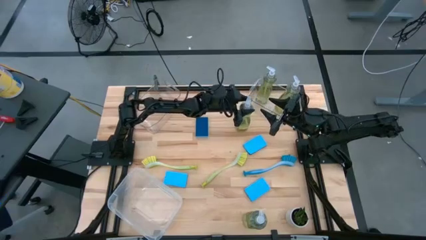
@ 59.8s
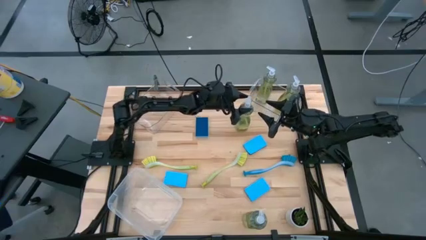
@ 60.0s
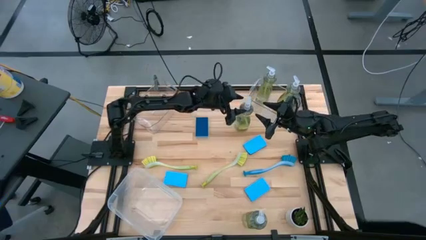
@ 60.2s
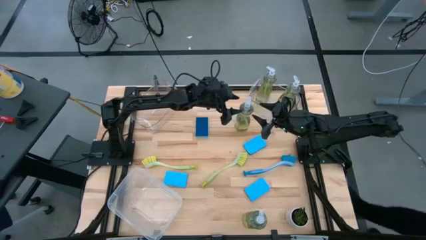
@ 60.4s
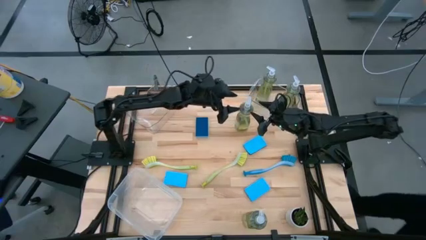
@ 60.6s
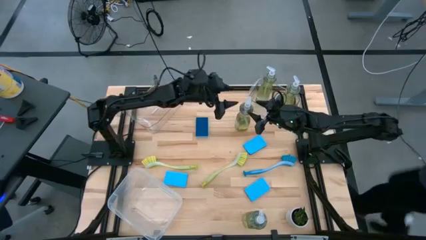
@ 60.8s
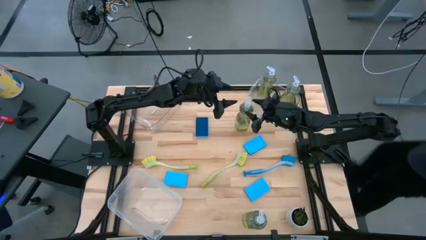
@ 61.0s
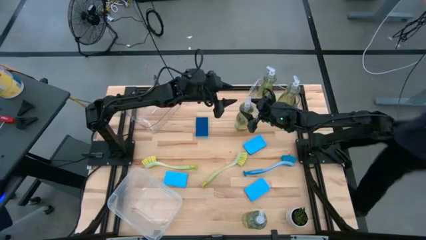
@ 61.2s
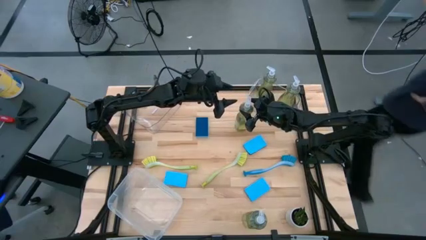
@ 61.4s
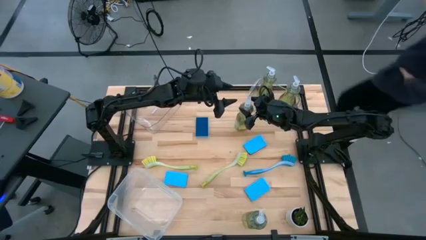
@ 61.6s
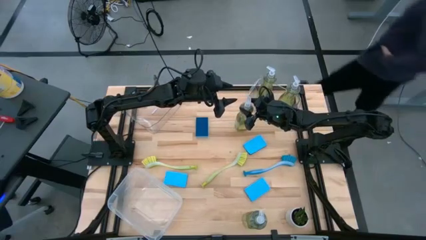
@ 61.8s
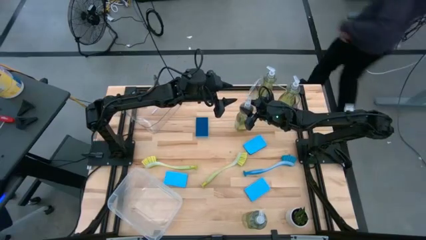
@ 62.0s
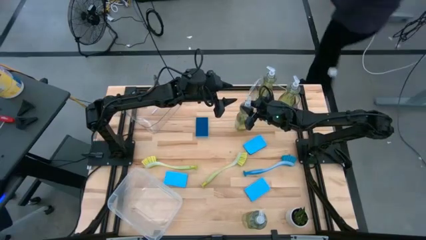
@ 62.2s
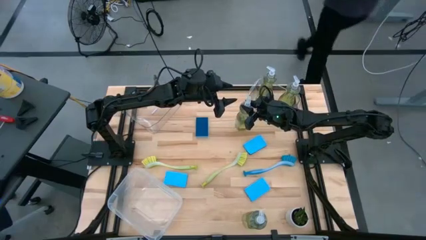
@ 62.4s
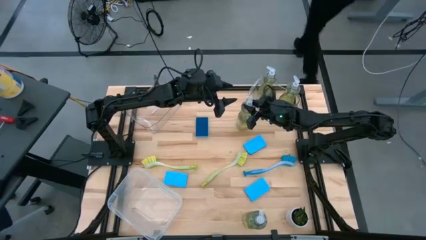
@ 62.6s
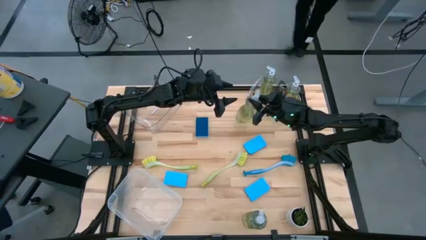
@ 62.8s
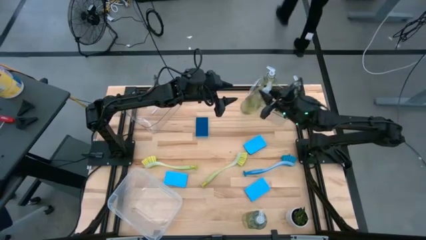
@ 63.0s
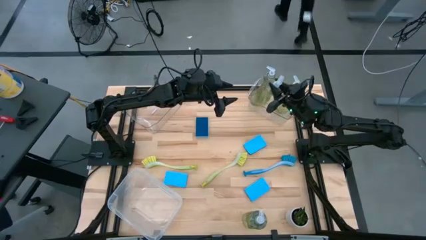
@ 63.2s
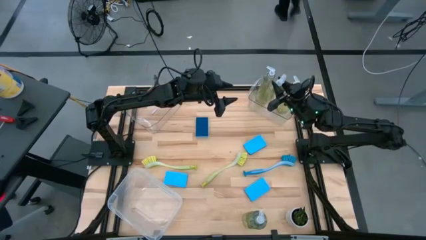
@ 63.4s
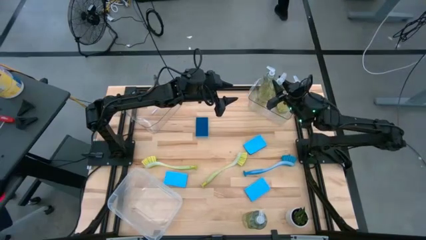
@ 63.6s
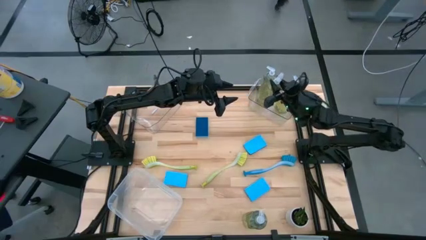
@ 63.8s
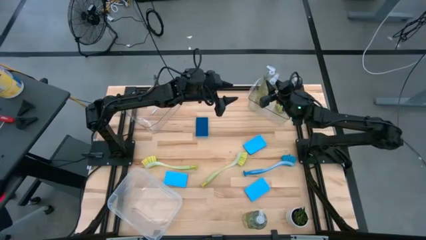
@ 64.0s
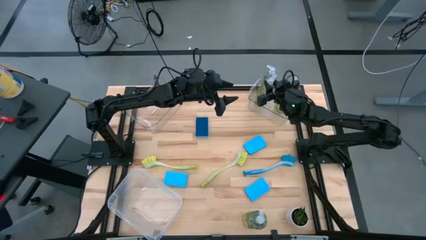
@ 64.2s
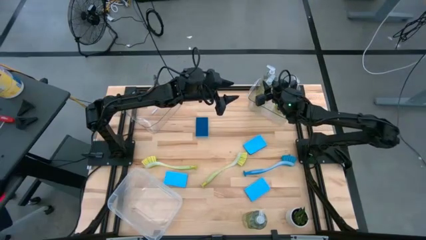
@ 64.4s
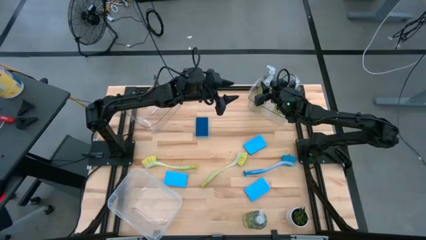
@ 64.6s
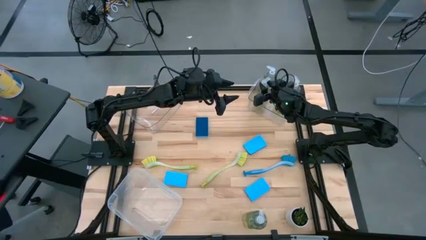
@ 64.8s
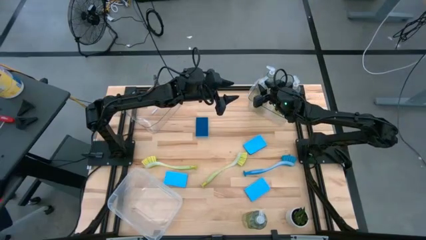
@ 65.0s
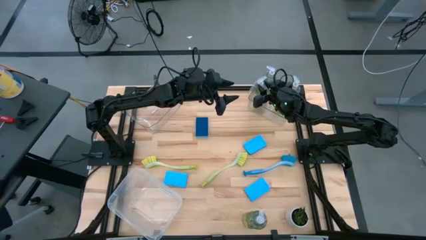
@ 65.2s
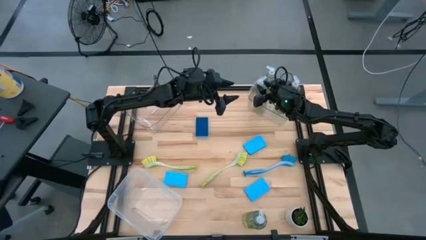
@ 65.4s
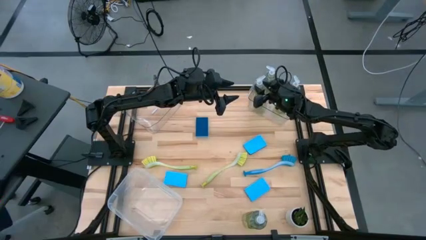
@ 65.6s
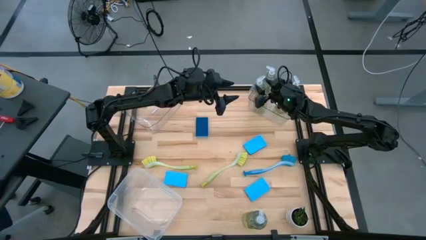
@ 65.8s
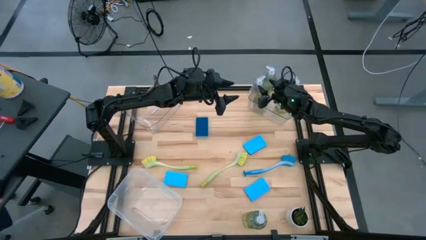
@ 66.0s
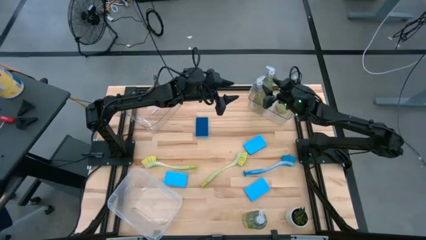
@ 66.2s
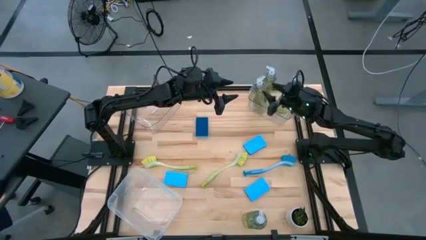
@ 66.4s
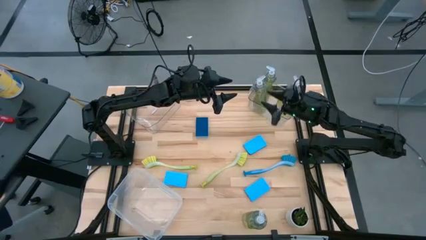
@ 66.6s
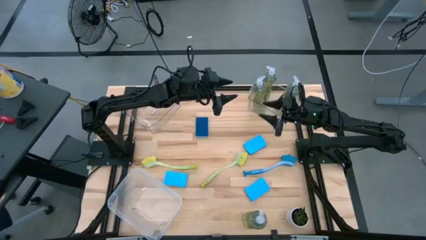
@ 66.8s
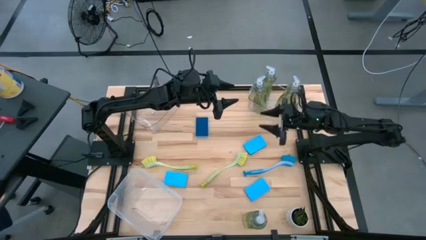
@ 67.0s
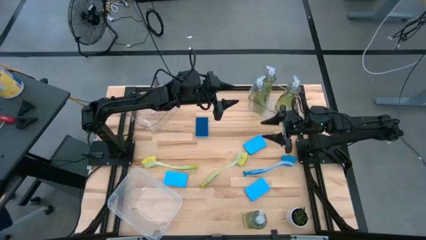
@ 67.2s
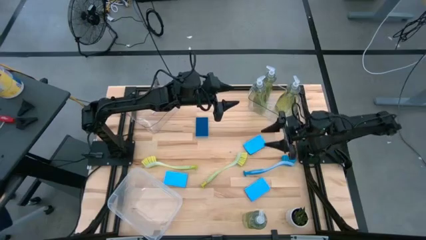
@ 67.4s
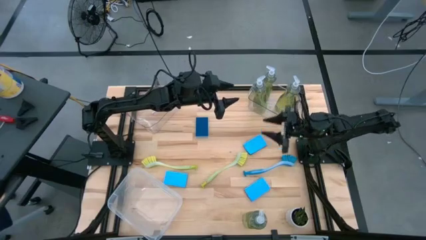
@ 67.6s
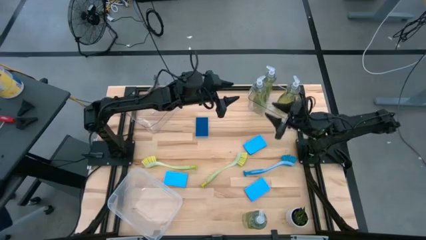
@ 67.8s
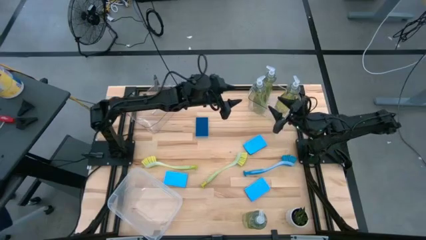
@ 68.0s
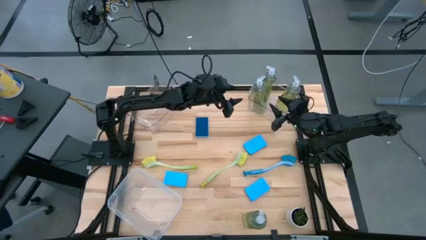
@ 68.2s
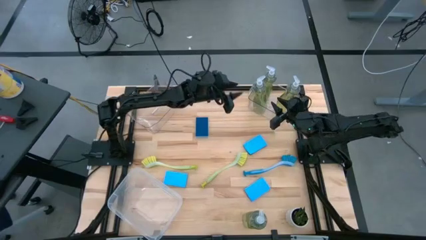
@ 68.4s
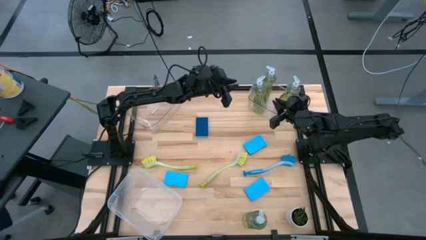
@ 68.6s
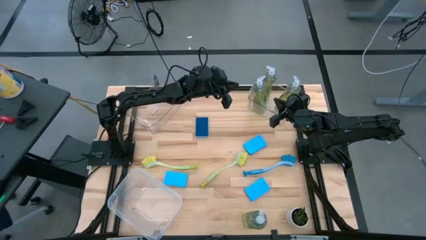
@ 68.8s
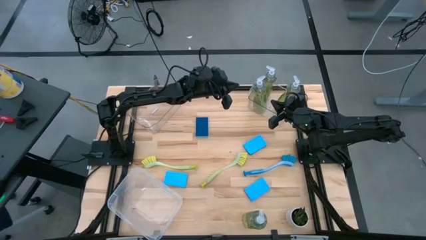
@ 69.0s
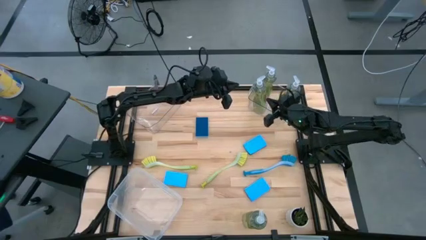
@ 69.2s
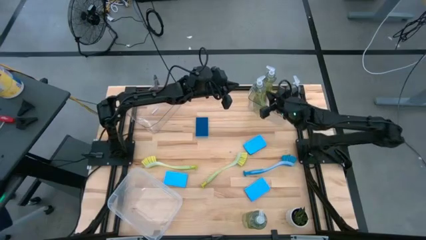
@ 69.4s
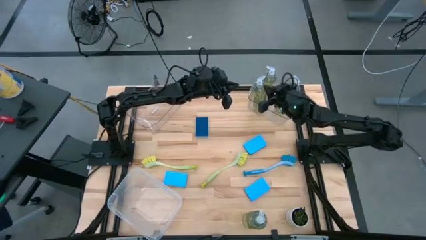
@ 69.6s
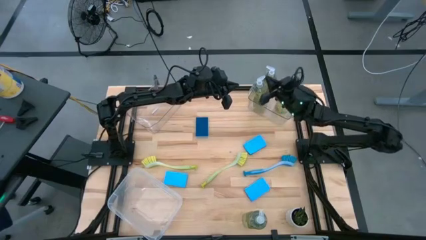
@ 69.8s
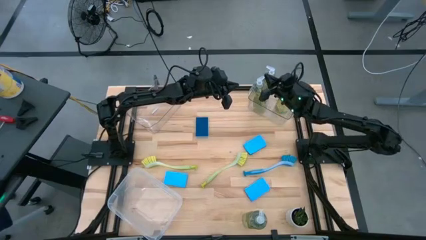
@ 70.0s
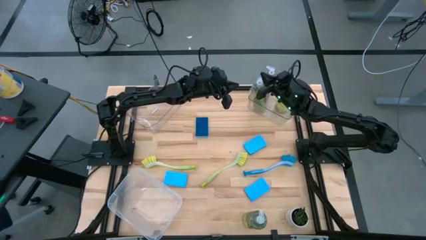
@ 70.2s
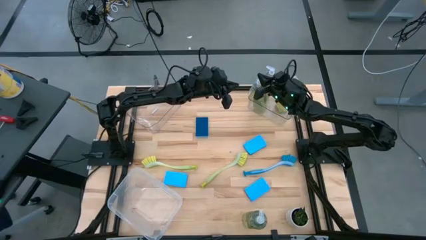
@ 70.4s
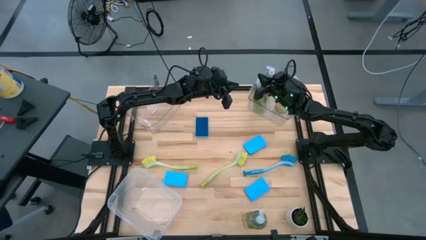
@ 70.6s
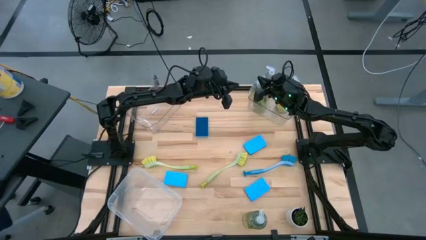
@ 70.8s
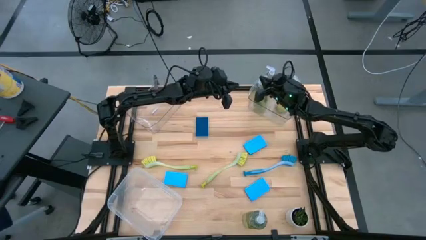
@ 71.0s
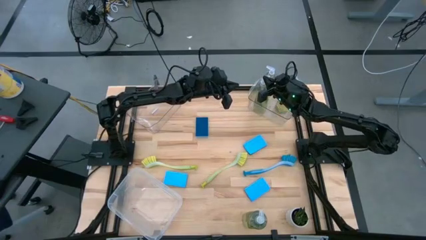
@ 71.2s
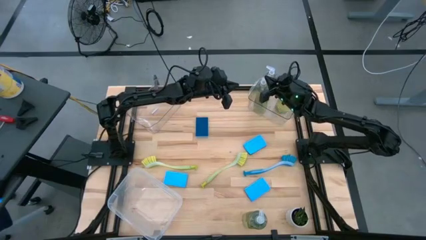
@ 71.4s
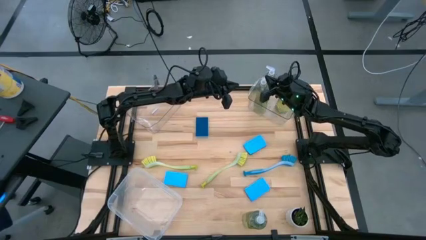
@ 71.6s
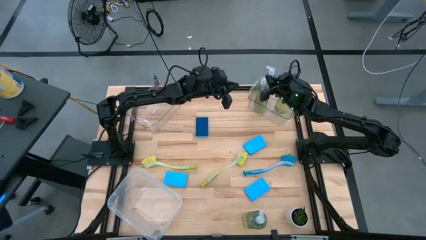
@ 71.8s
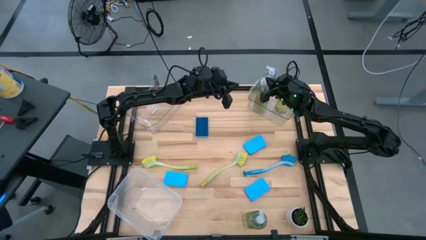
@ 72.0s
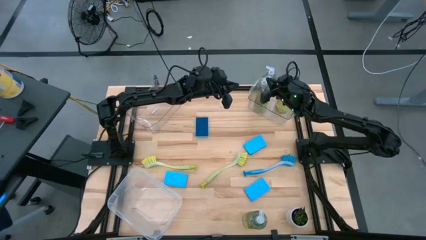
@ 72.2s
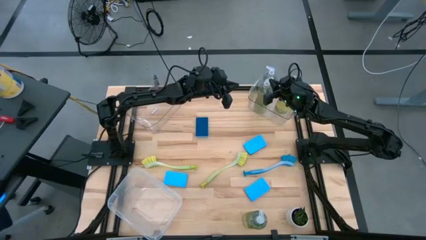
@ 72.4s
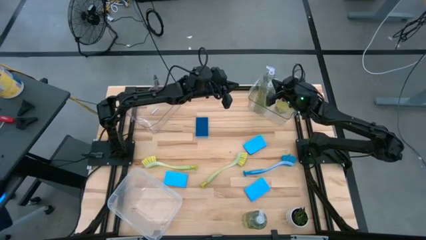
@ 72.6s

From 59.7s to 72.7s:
Task: Pick & Place Kitchen Sink Supplies
Put the yellow dish soap bottle into the right transparent bin

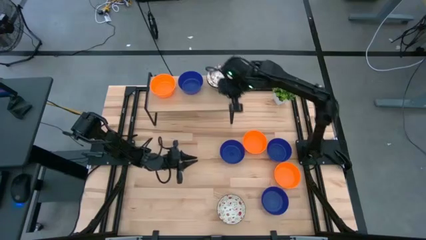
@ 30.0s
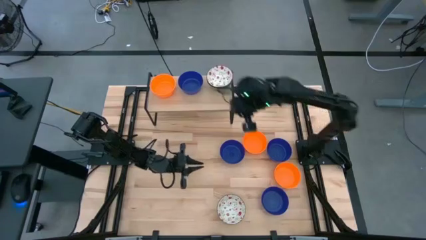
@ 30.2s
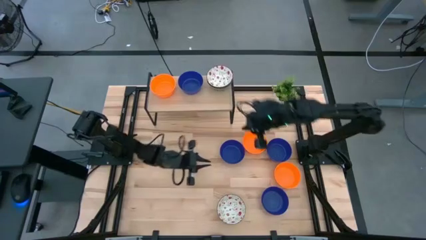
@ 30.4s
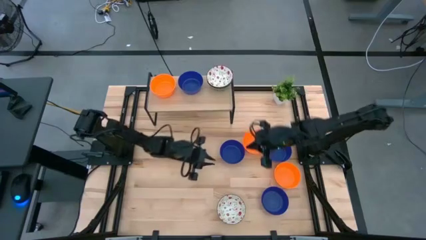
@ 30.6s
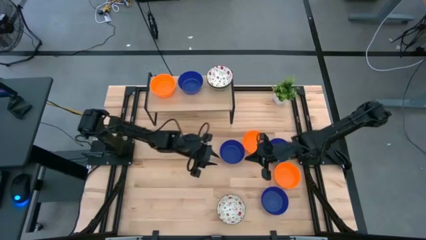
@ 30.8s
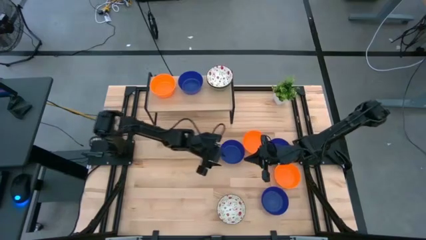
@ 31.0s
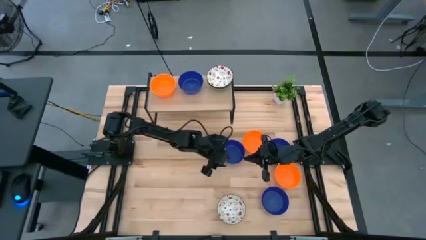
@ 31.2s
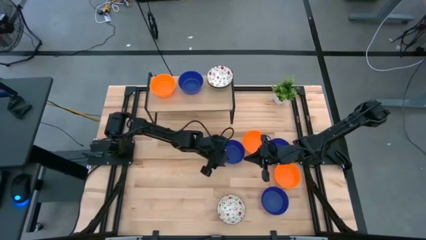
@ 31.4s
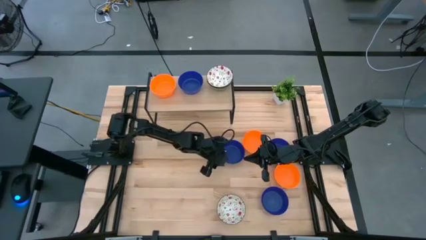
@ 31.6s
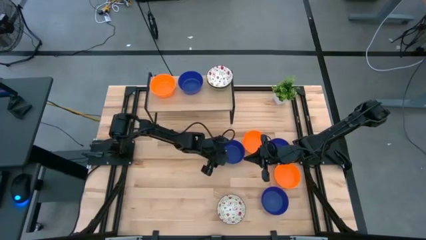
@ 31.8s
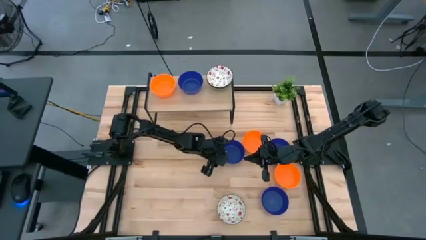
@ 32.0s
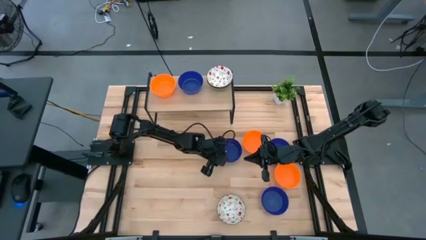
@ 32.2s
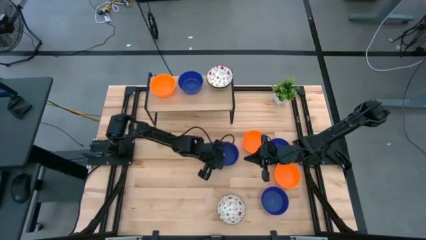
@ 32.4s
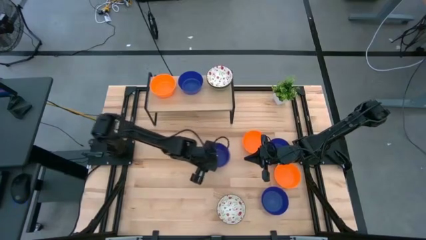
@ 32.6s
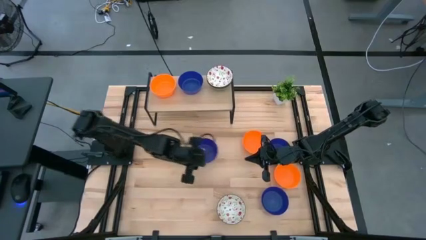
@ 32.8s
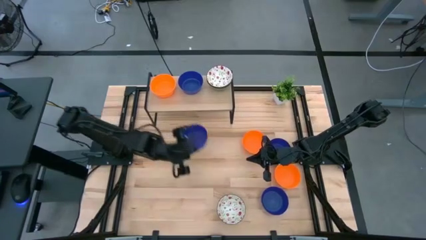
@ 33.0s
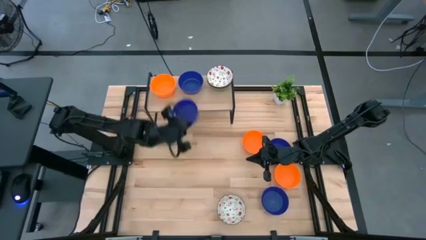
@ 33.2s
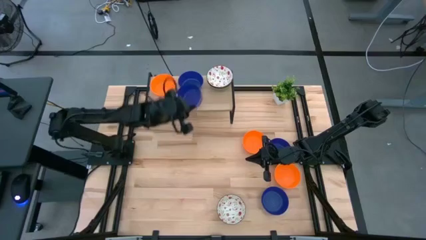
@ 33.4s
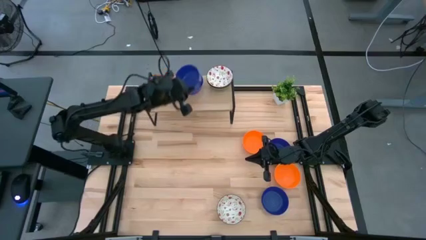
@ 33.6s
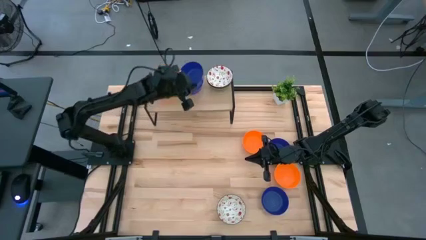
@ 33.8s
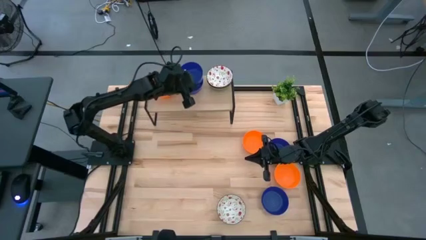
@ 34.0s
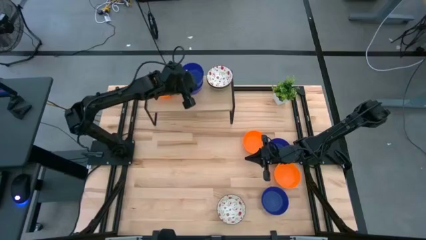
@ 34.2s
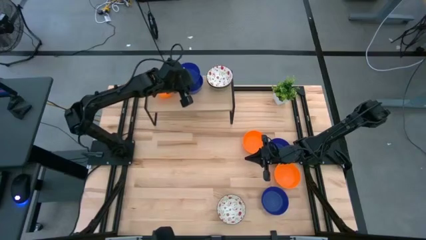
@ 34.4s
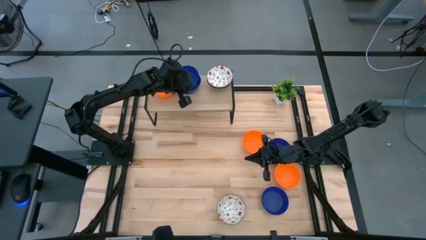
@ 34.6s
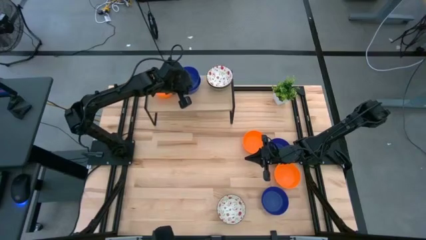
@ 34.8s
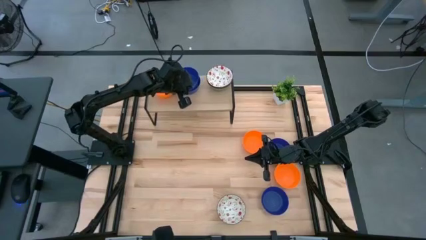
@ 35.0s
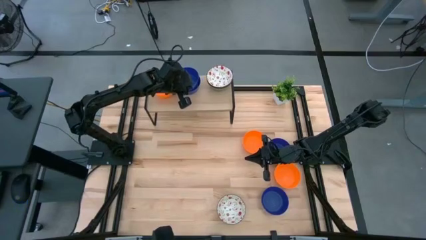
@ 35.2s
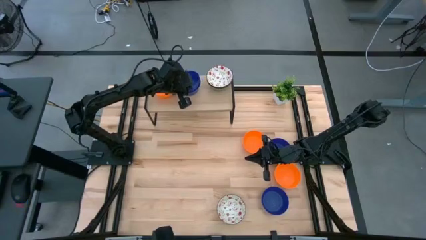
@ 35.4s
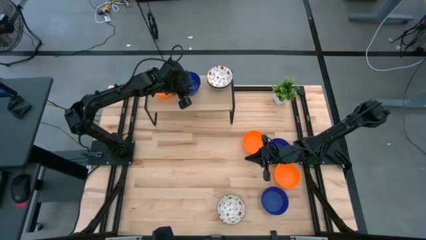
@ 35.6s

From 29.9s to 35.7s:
Task: Pick & Place Mini bowls
Stack the blue bowl on top of the other blue bowl on the shelf
